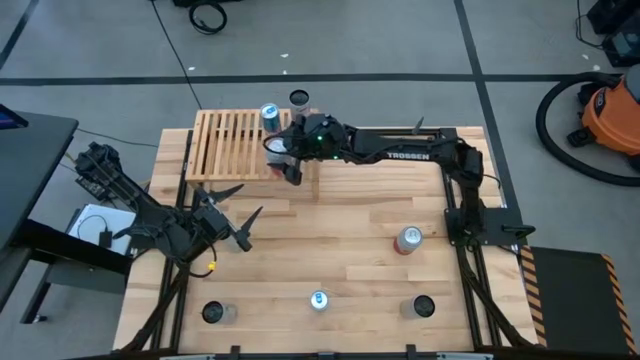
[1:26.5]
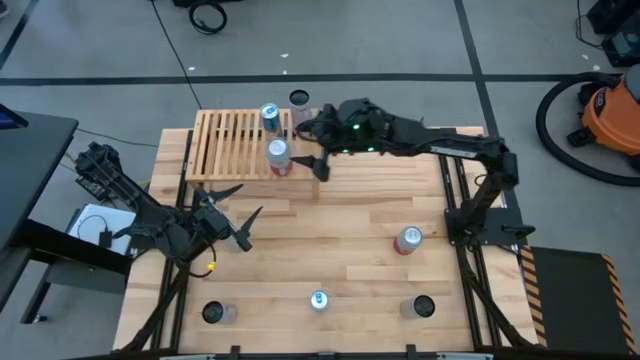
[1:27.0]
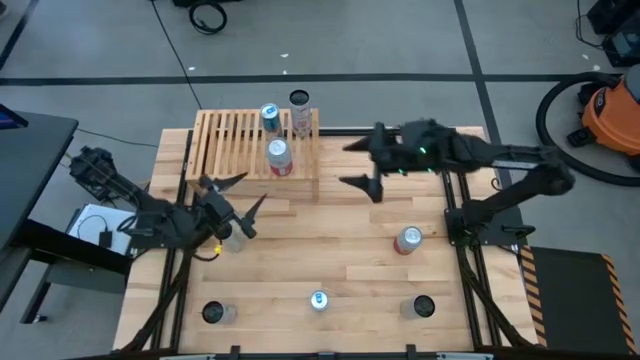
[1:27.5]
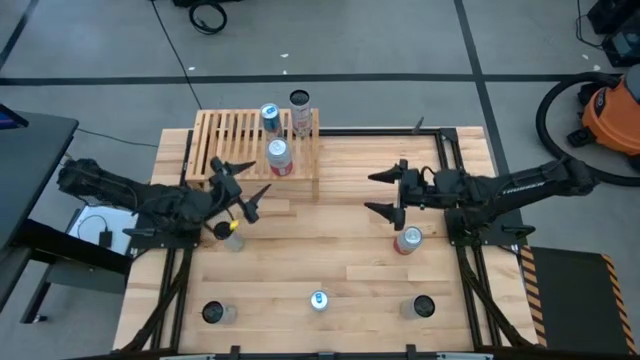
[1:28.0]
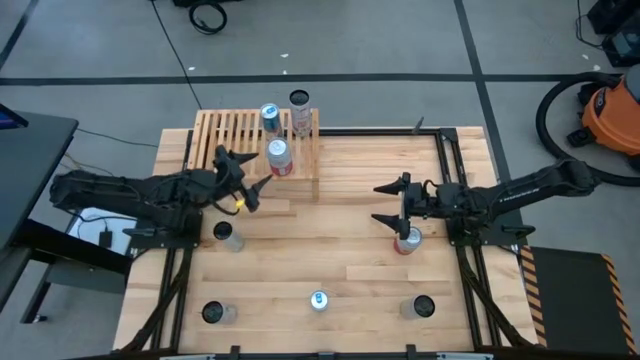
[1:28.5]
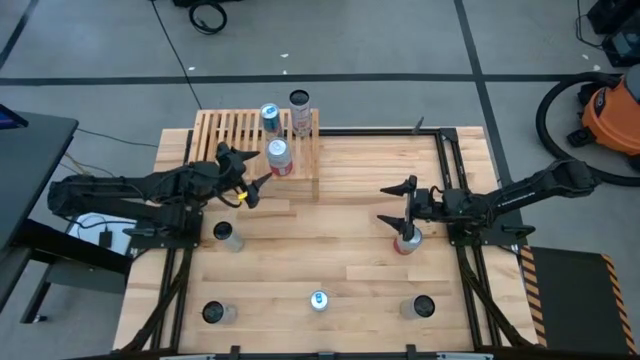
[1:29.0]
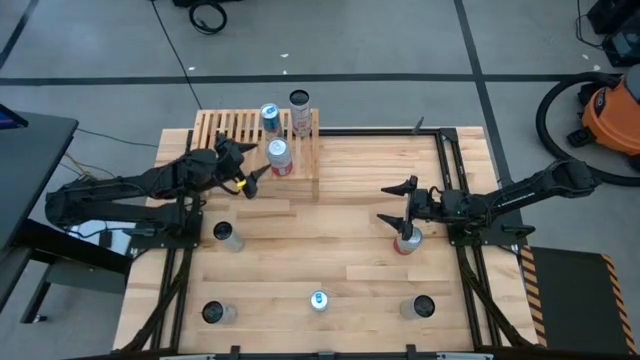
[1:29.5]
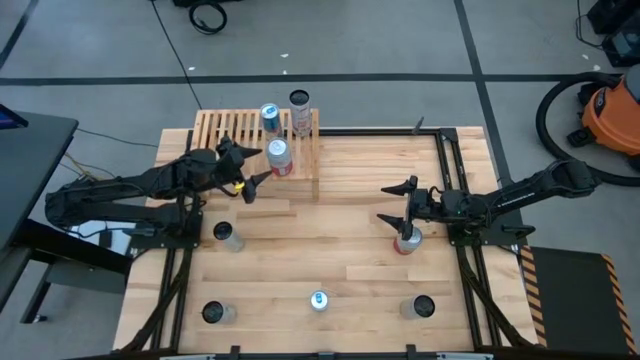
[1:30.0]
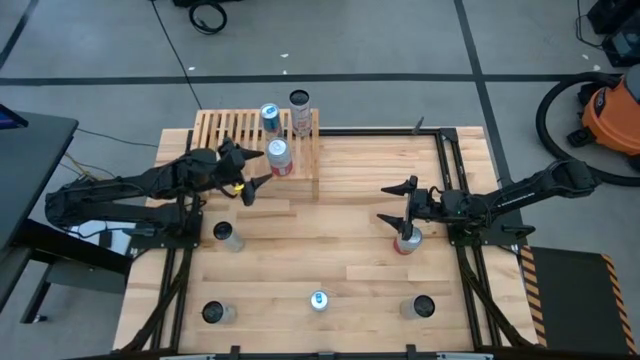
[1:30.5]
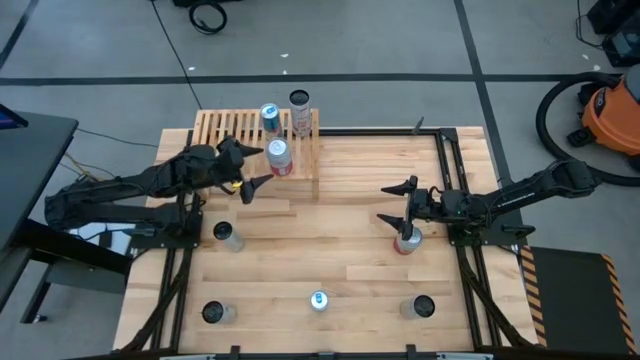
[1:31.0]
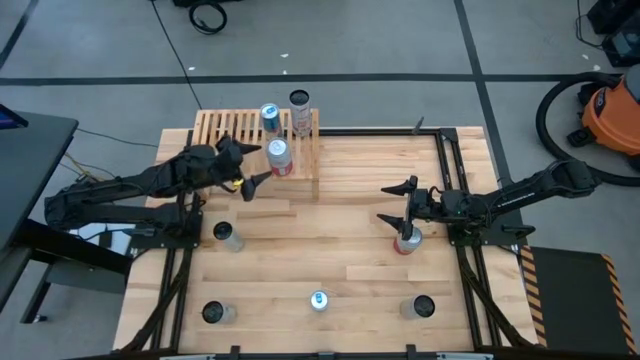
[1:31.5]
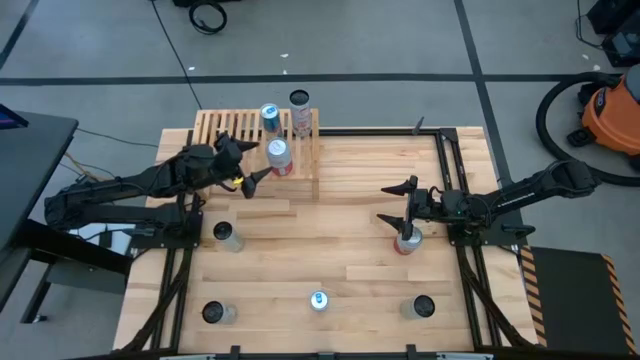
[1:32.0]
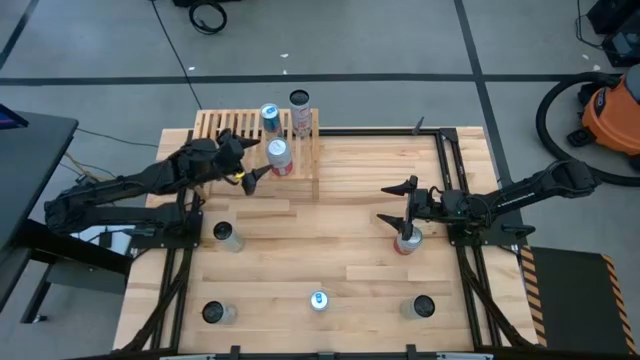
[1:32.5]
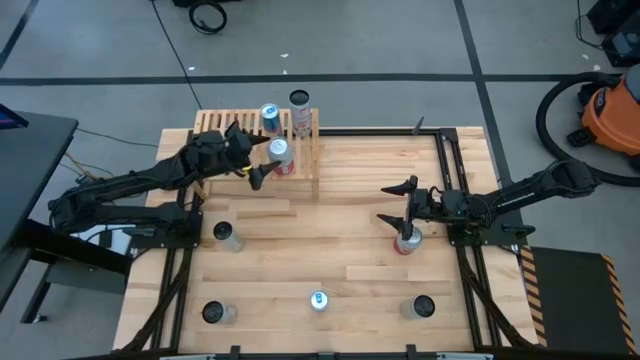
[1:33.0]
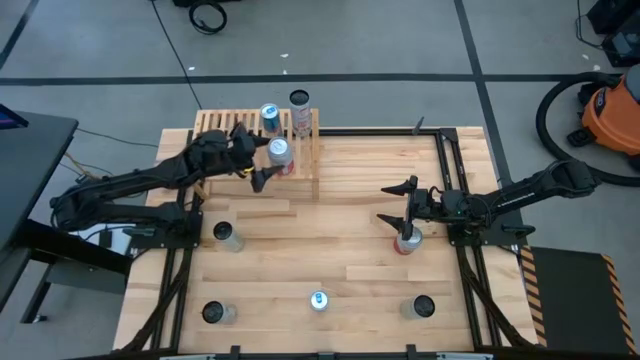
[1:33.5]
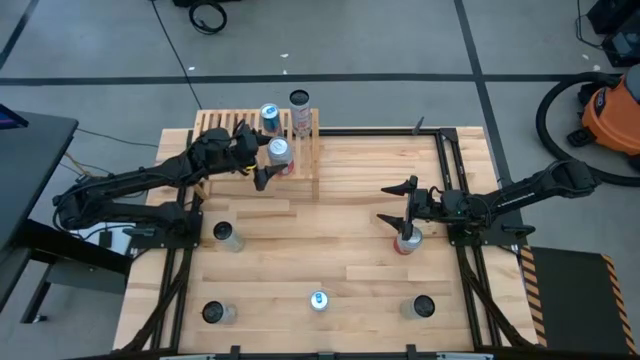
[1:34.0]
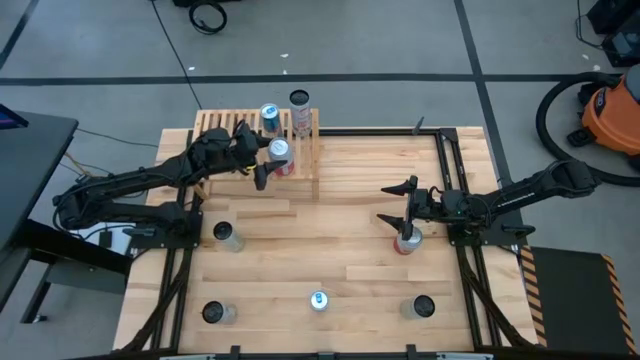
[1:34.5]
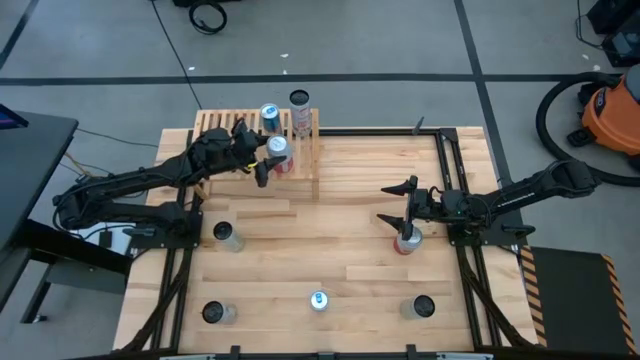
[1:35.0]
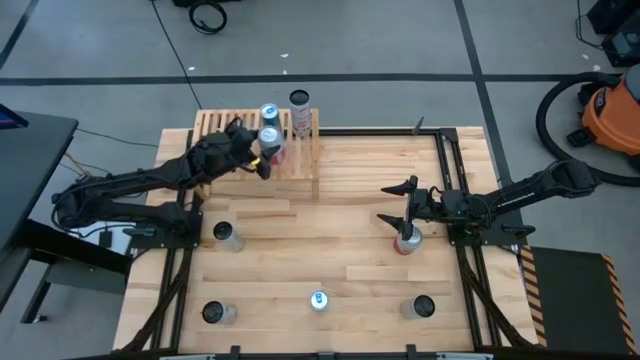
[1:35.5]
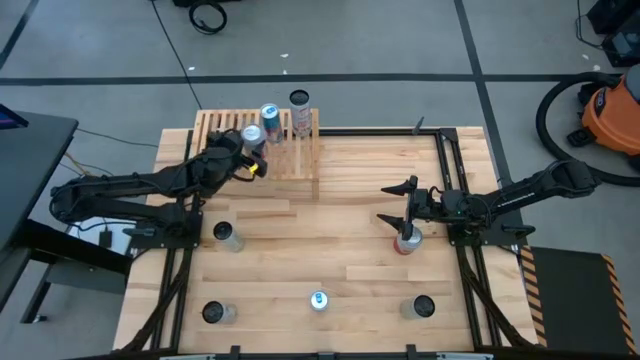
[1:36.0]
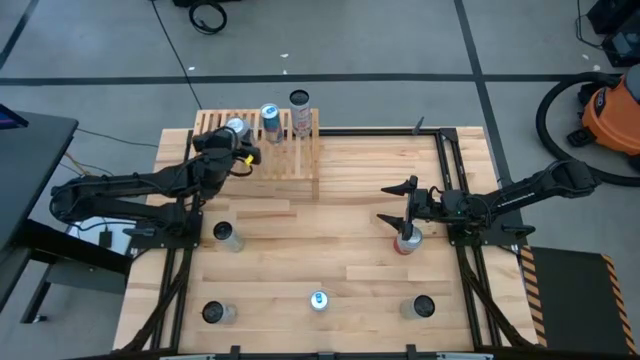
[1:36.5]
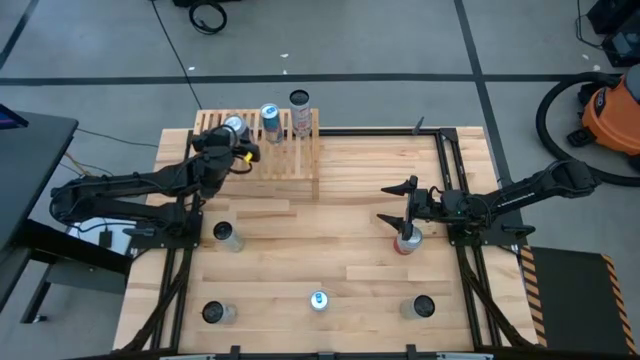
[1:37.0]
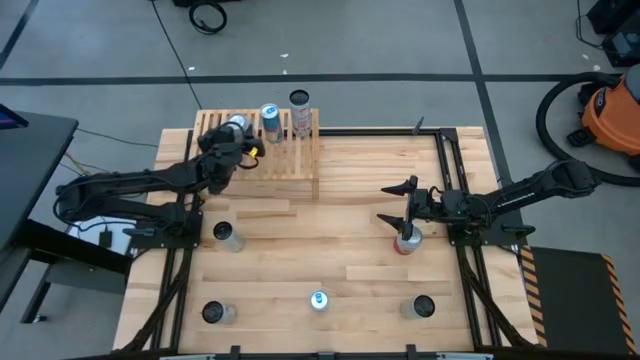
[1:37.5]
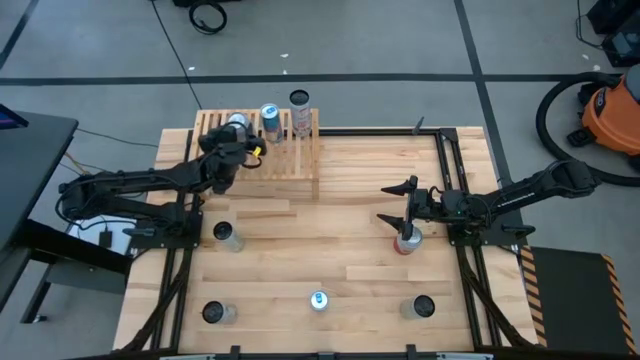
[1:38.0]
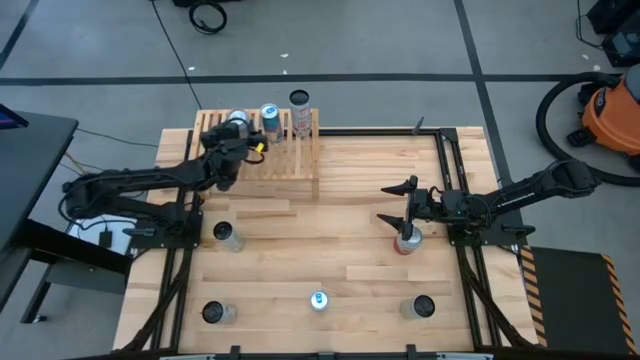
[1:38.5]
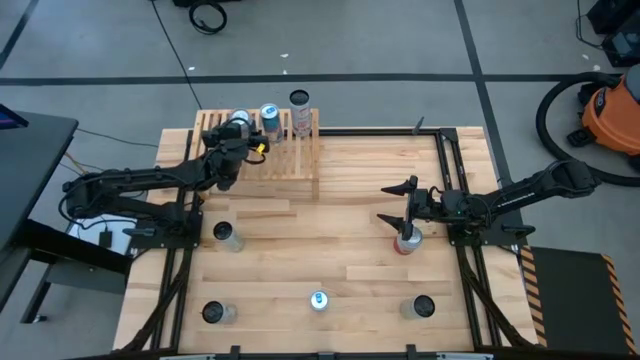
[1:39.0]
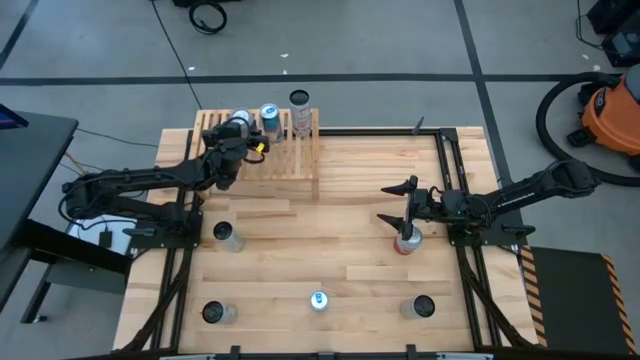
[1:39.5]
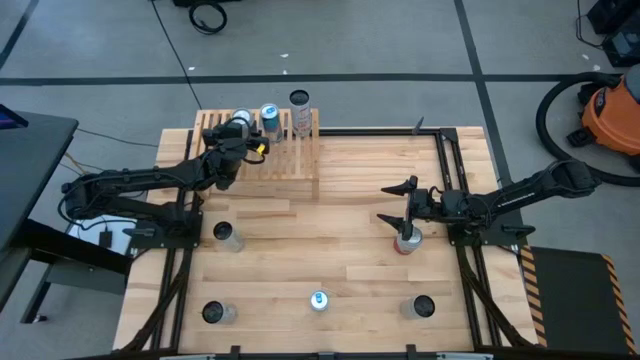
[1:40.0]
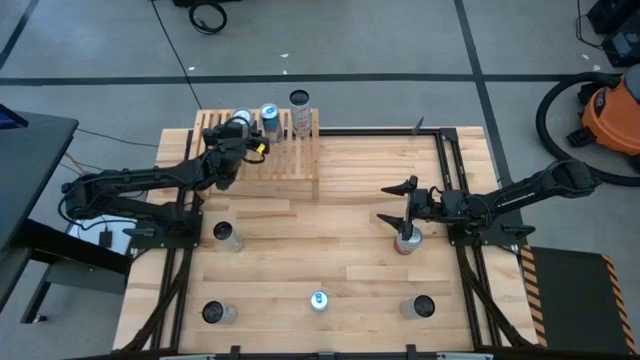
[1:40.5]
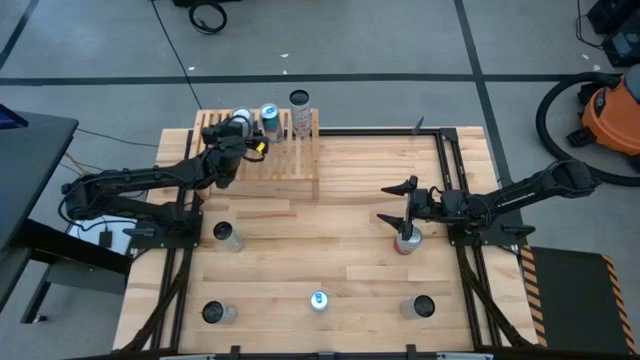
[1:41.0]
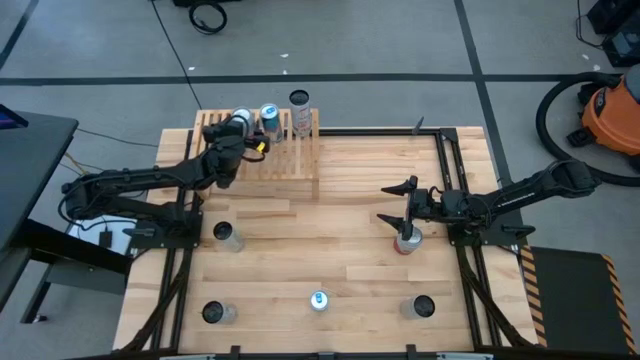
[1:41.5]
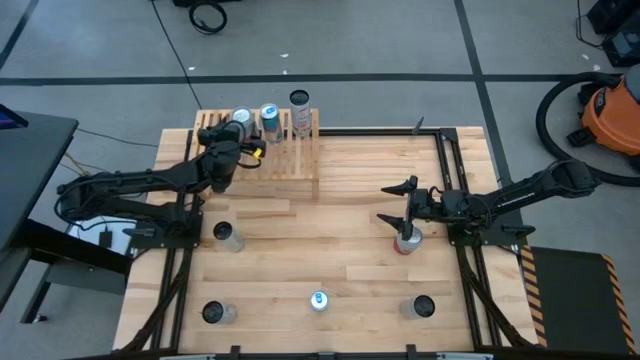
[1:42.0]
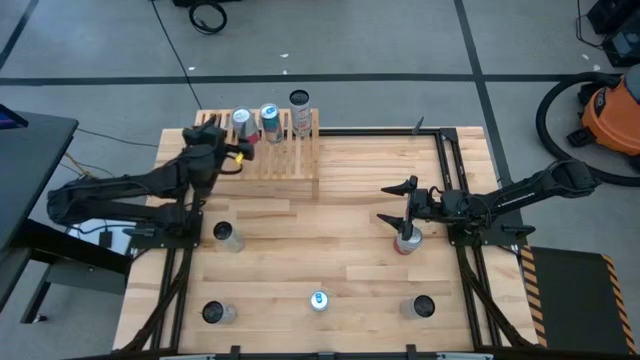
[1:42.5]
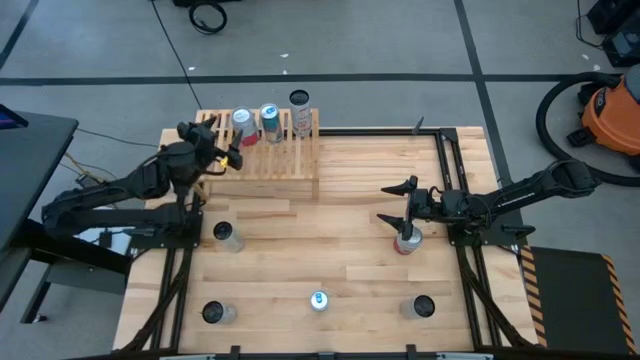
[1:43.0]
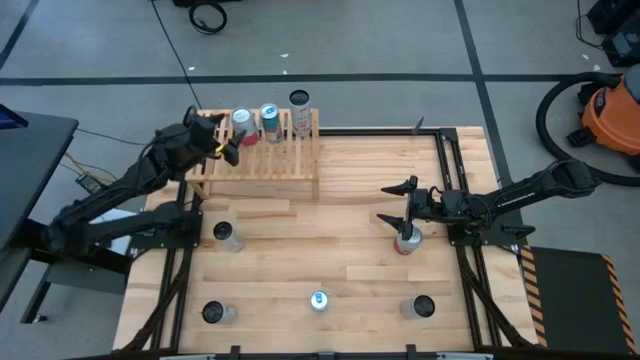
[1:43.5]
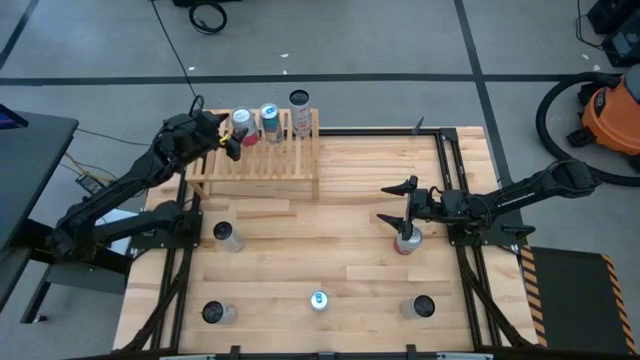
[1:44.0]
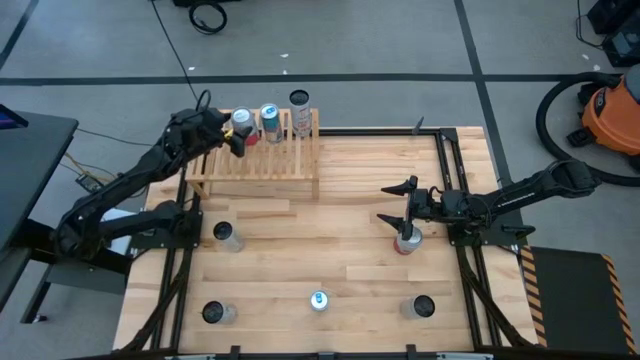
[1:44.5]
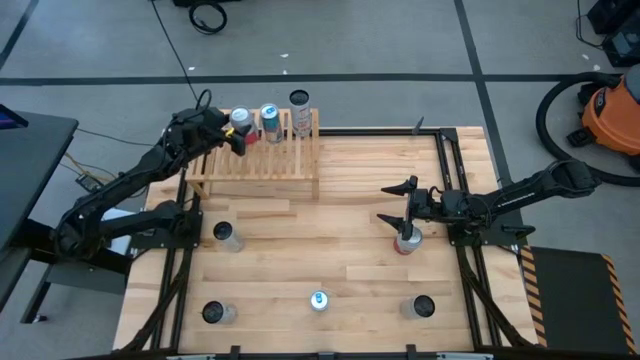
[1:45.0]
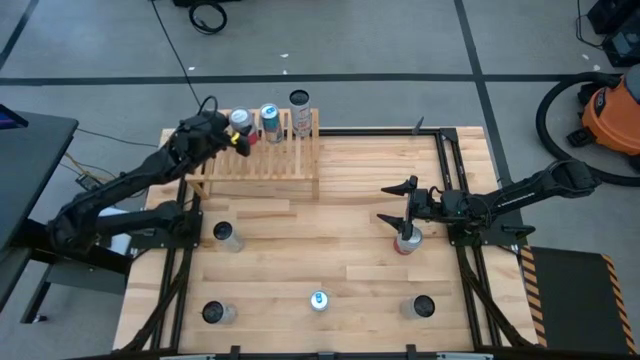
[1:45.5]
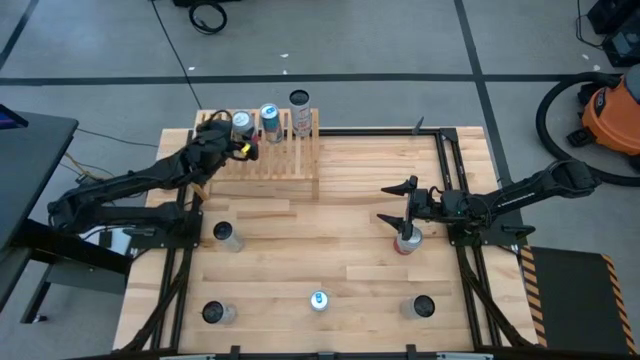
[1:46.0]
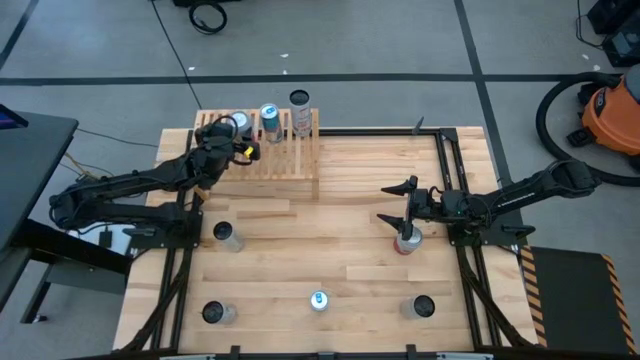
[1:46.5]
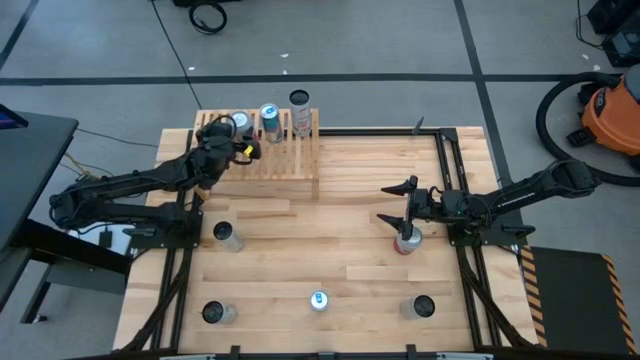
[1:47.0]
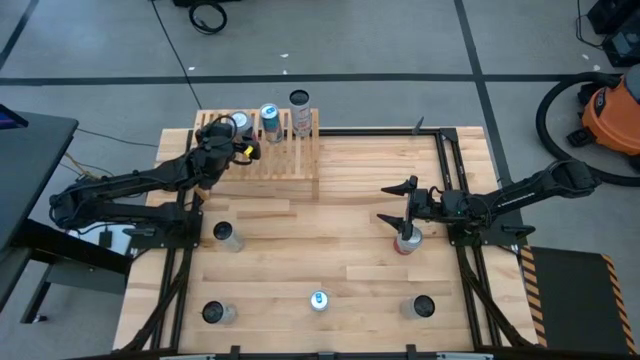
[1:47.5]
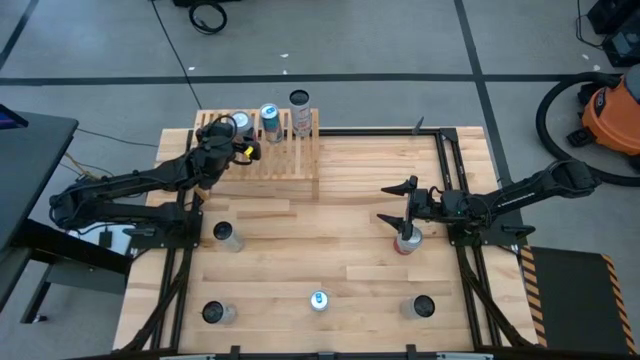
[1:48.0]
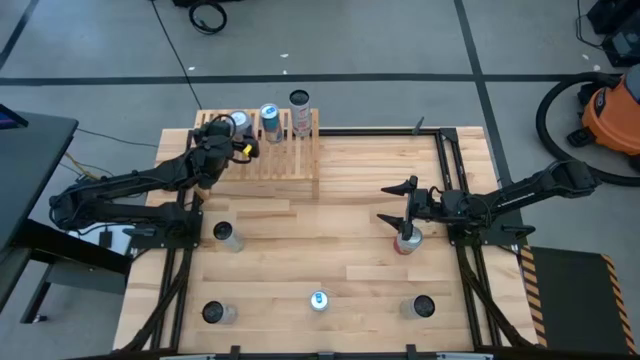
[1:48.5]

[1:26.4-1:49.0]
Task: Place canned beverage on shelf
Put the top pink white soda can on the shelf
